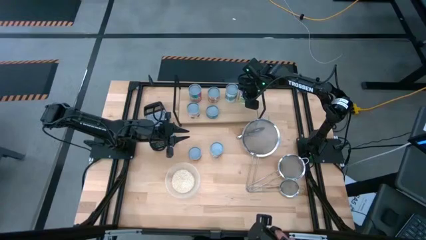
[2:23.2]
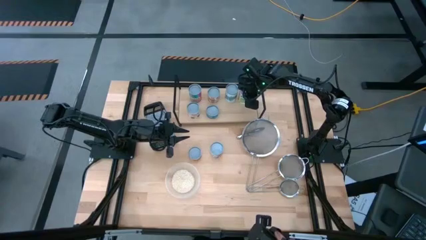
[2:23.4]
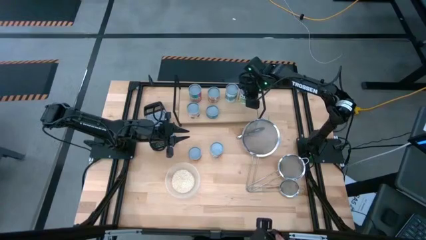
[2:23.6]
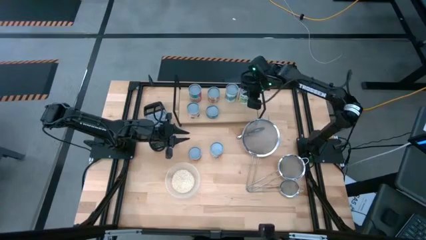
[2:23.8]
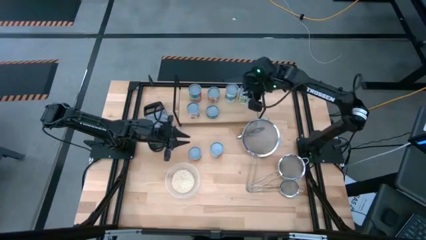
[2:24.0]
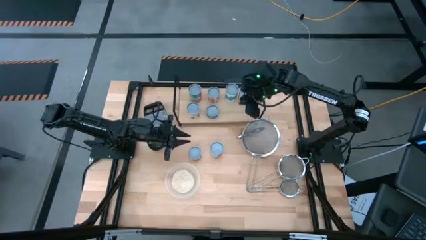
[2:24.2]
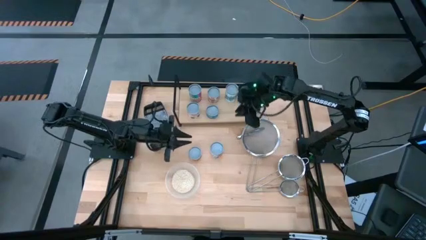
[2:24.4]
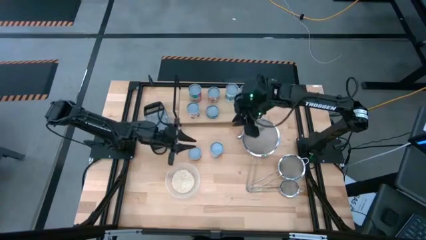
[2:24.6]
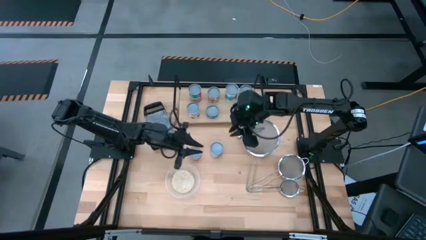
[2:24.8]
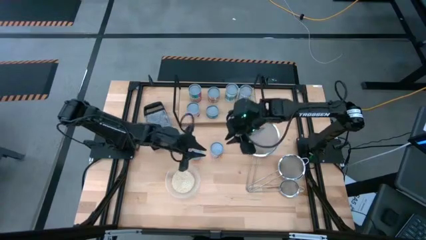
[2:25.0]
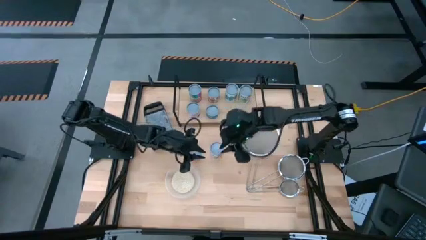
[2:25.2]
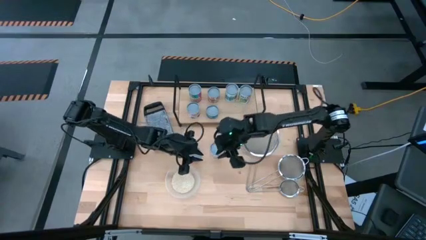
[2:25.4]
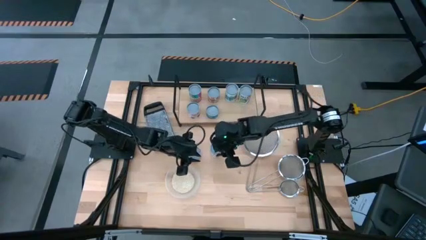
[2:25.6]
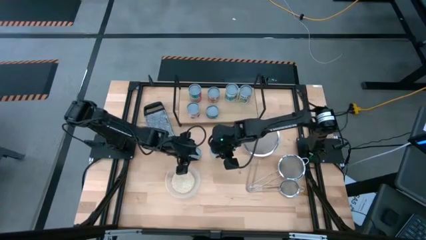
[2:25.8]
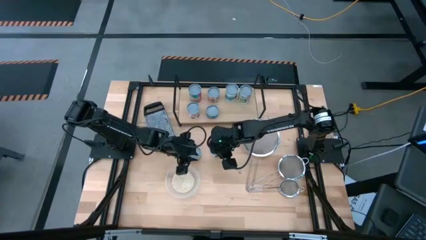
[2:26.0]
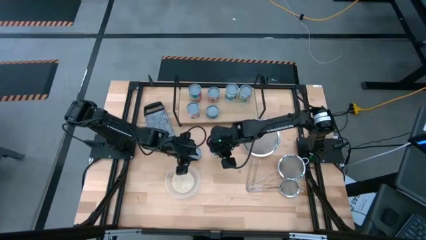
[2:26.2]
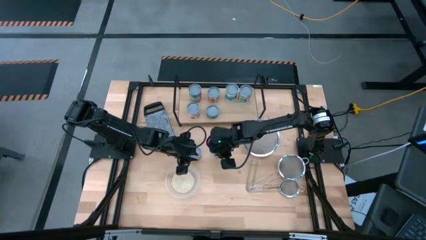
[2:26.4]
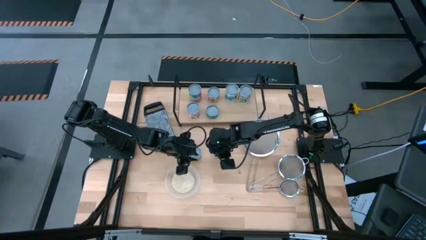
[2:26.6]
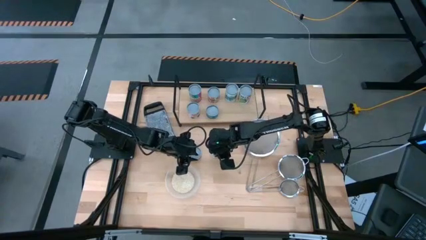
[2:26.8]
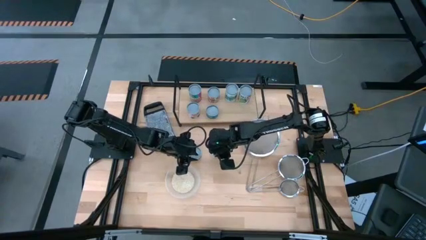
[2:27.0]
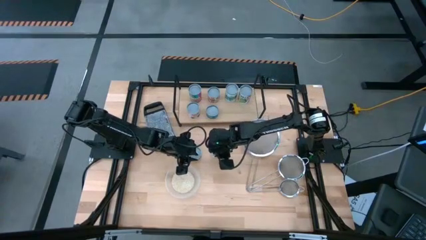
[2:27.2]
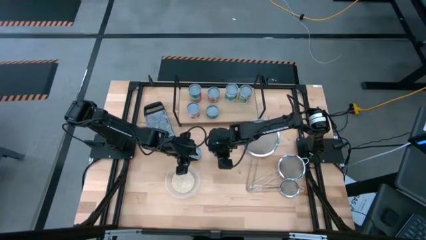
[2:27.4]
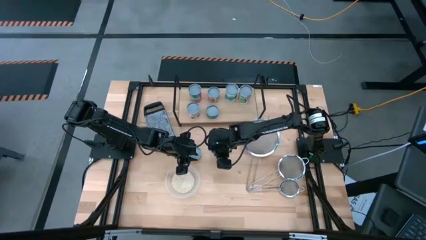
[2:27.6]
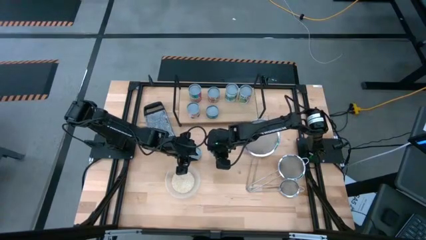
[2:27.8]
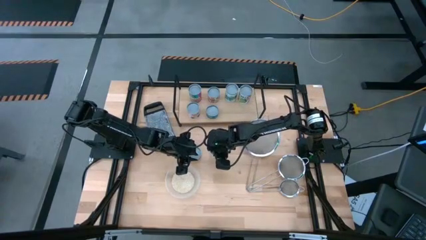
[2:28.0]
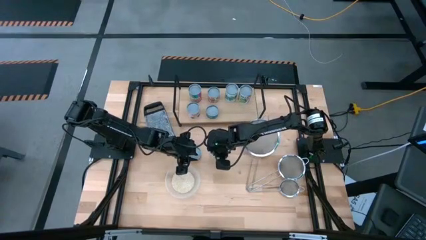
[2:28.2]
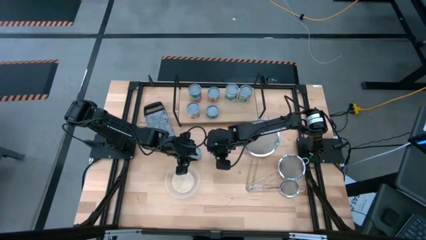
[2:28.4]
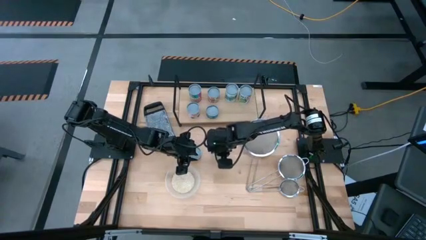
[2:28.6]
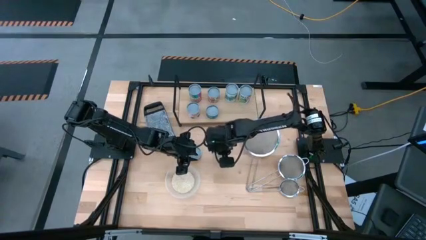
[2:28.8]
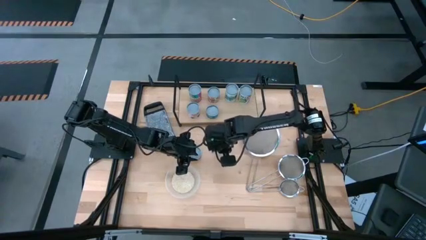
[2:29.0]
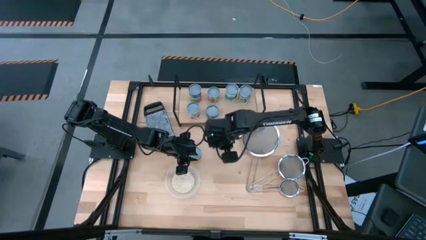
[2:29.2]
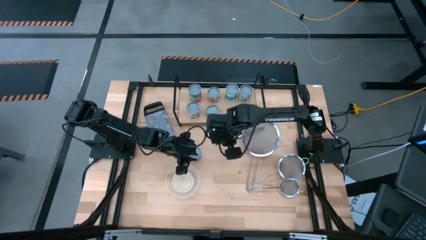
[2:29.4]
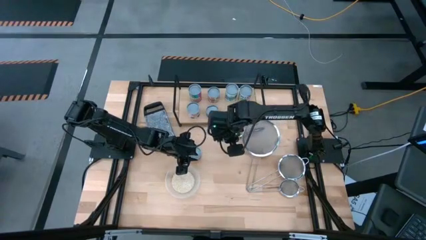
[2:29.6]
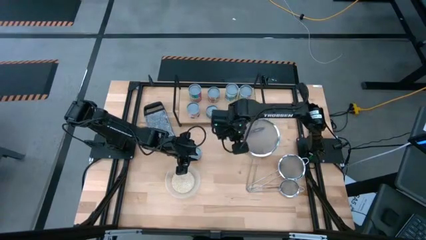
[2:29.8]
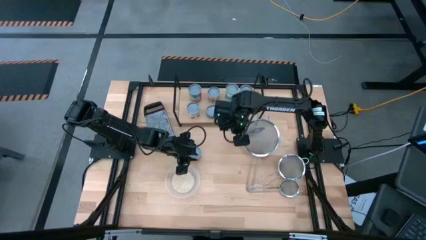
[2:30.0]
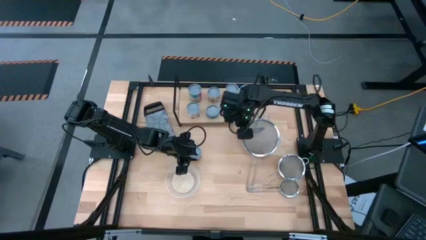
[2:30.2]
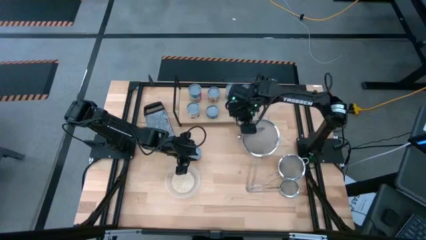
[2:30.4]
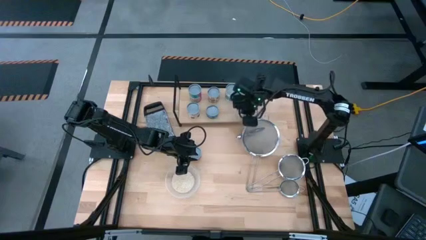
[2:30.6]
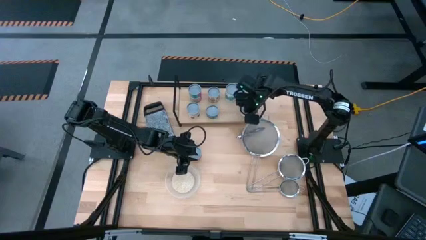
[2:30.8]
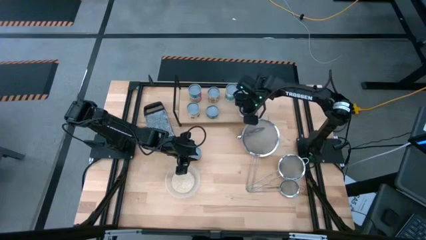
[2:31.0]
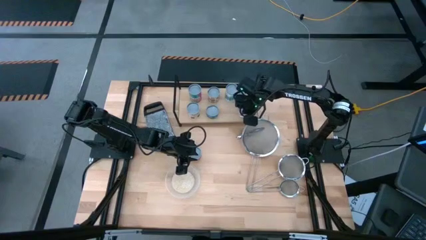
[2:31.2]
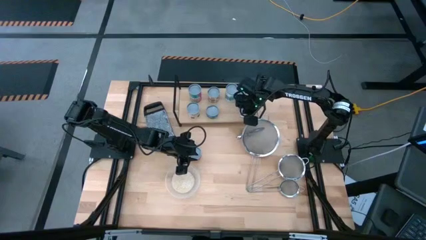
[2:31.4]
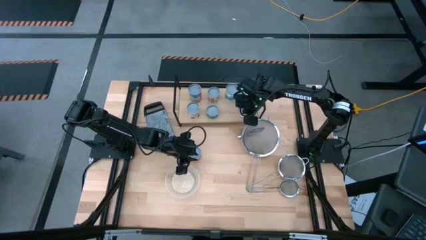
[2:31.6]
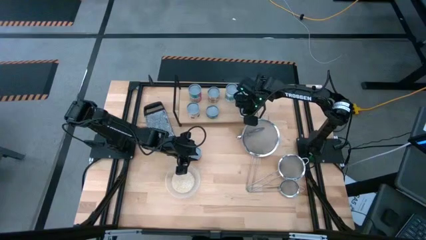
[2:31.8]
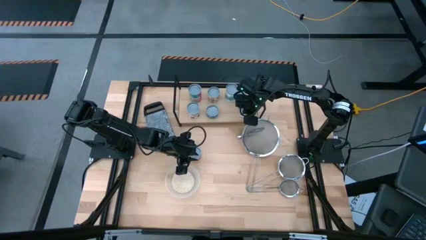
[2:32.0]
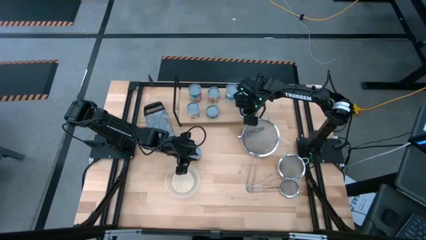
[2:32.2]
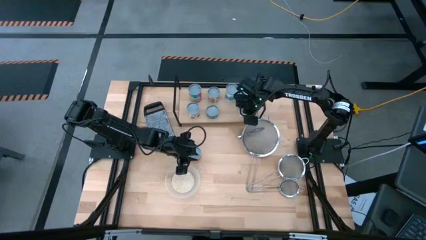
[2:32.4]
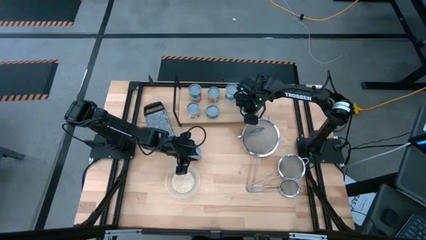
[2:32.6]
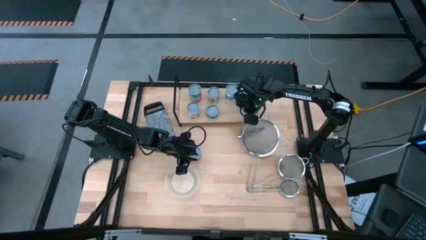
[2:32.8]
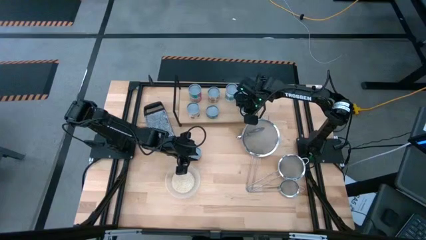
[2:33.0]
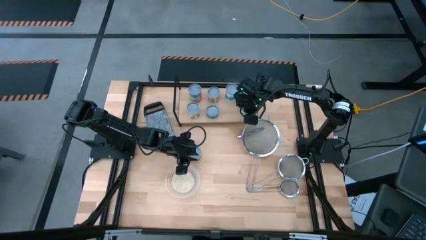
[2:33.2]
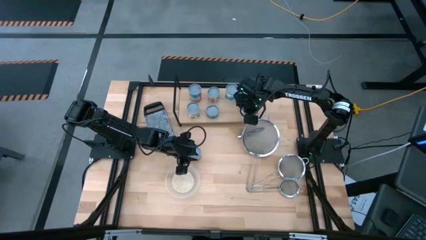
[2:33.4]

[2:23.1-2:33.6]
Task: Pick and place cans onto a shelf
Put the green oranges can on the shelf

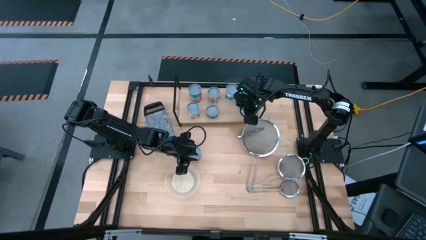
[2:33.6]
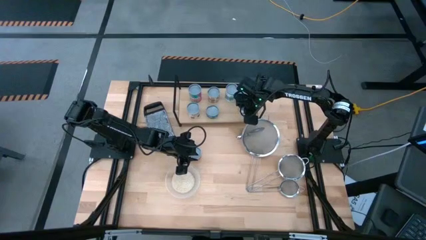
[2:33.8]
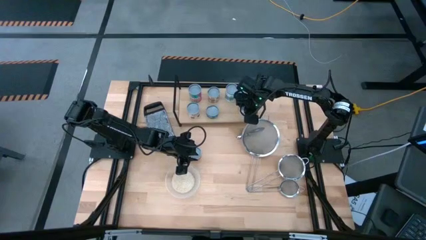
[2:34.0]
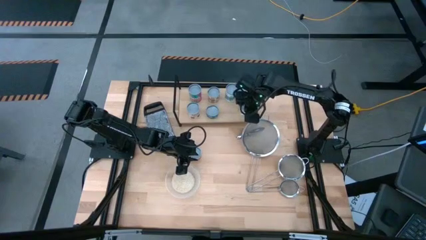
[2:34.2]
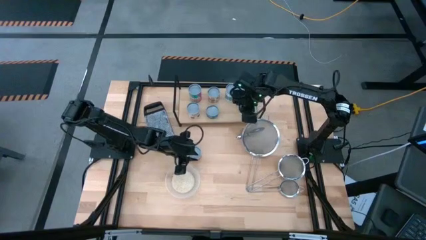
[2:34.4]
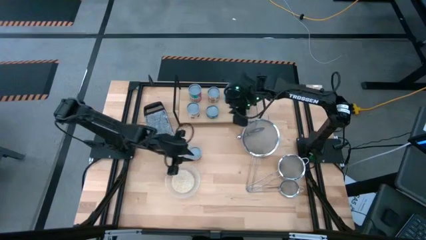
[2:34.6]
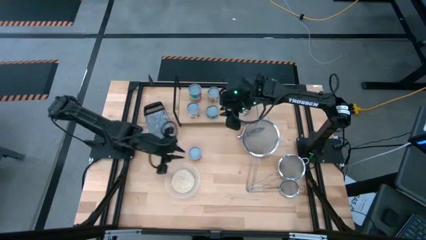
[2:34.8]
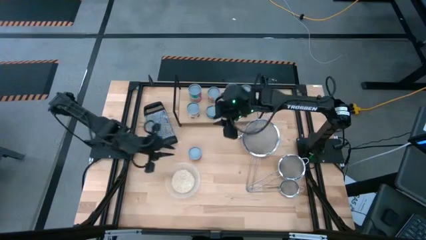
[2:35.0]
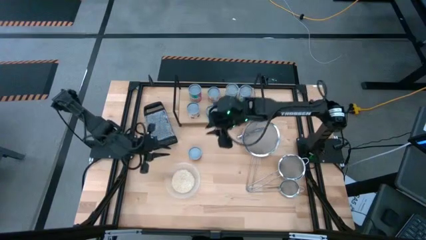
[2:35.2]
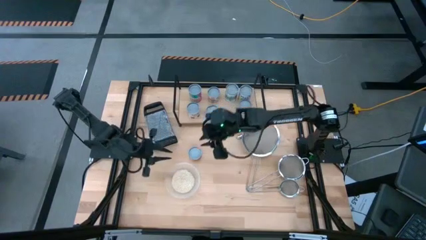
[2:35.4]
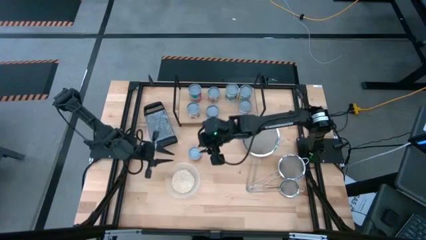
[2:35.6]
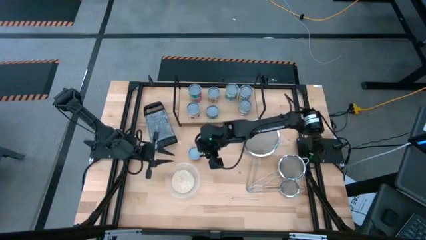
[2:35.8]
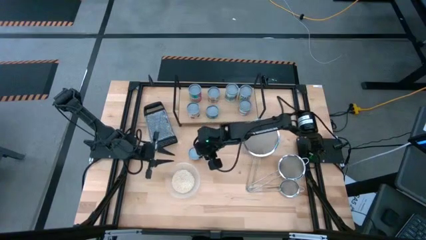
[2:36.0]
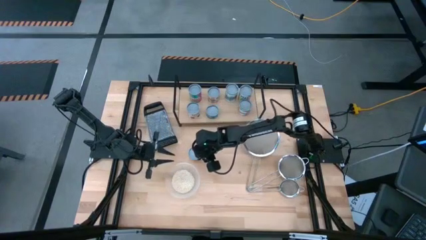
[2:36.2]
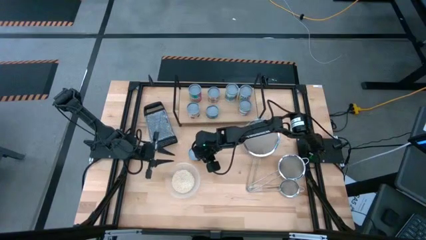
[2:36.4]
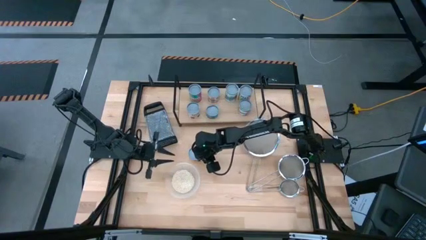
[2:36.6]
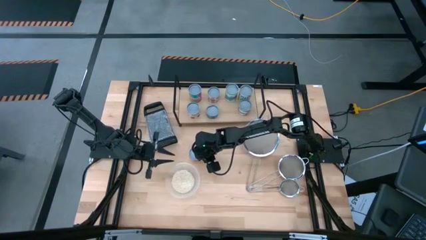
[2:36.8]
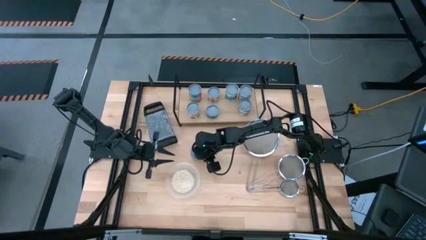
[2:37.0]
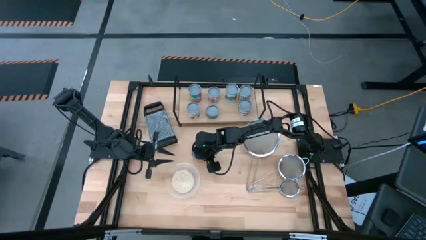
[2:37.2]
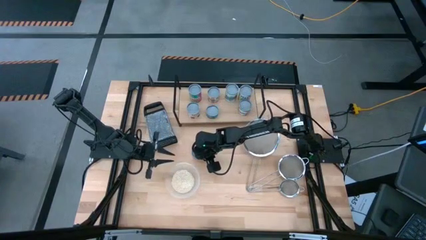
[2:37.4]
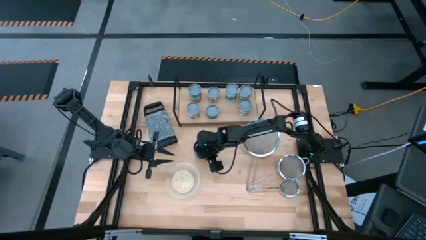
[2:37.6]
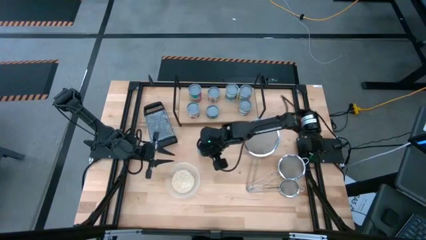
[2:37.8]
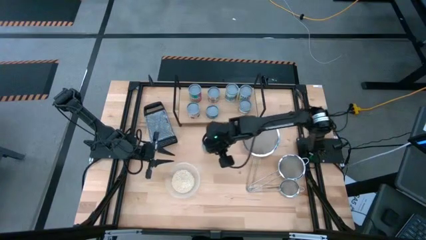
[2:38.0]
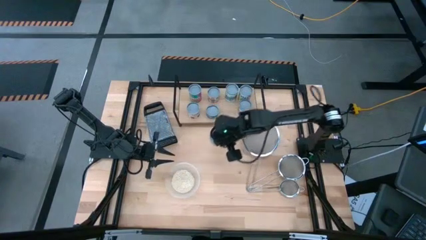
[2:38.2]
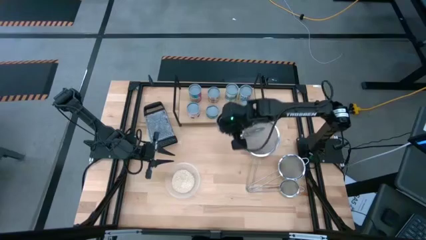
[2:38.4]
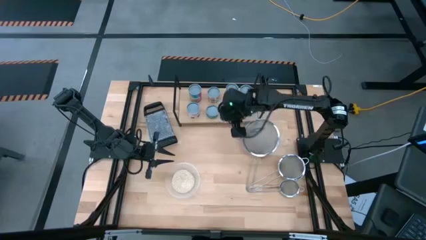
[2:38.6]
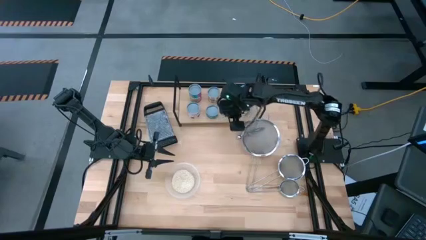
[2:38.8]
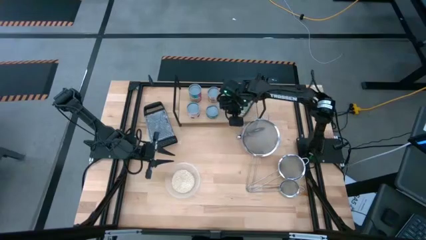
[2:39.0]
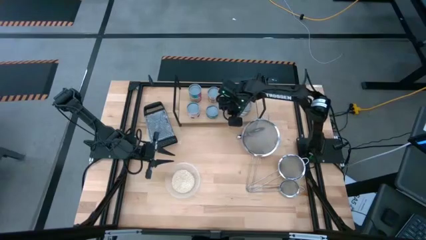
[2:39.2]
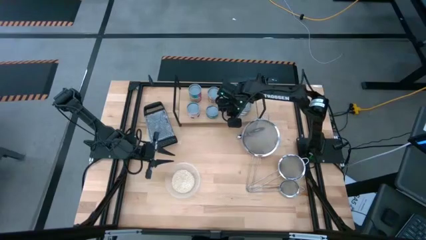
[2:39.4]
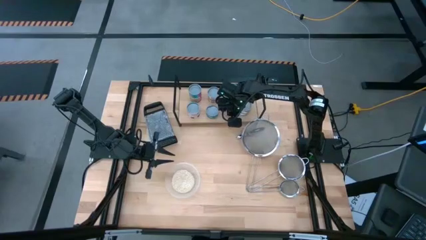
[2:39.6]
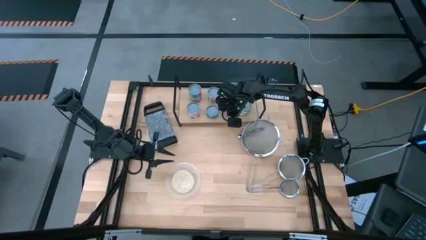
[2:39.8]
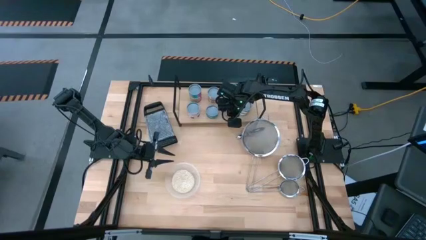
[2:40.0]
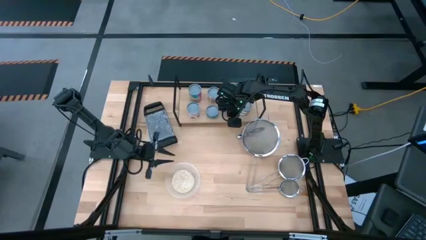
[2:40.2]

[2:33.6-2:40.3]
Put the yellow pineapple rings can on the shelf
